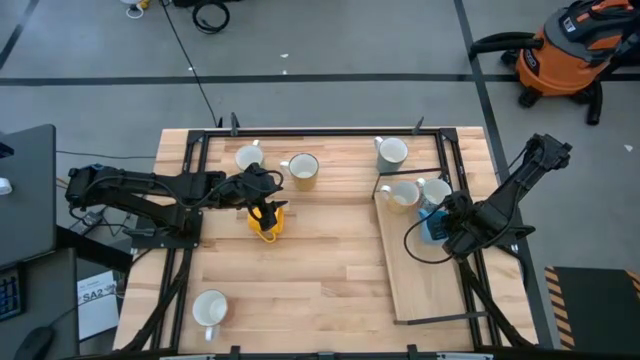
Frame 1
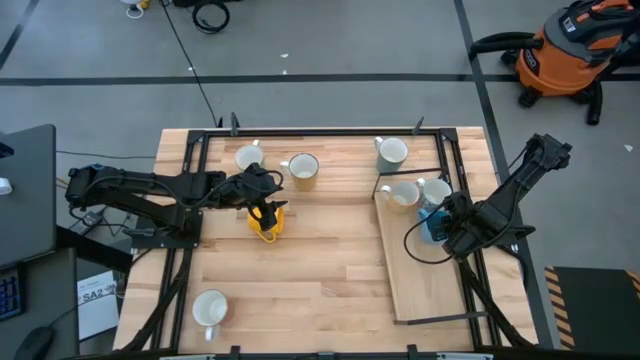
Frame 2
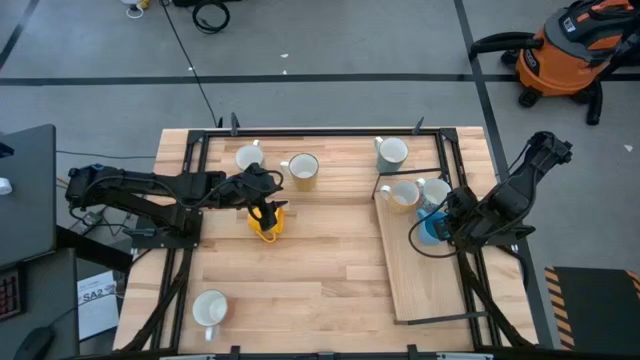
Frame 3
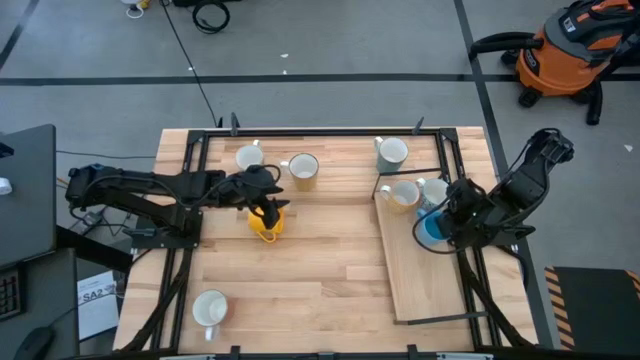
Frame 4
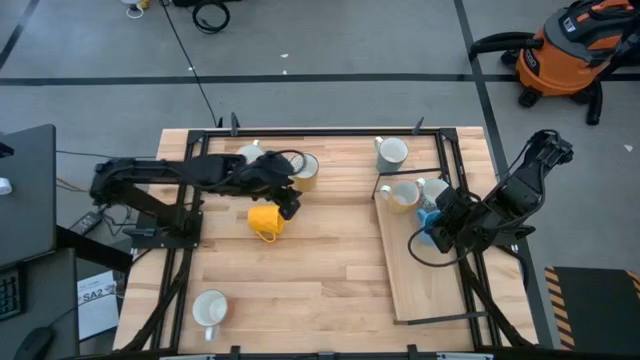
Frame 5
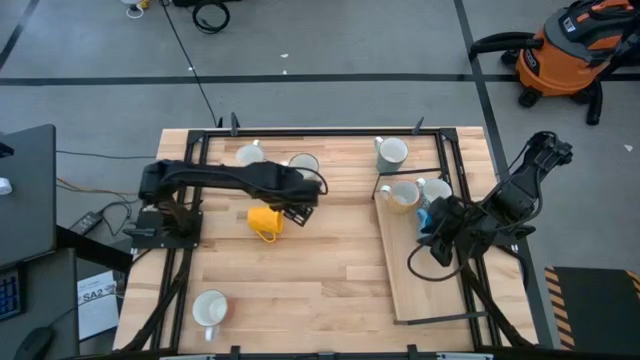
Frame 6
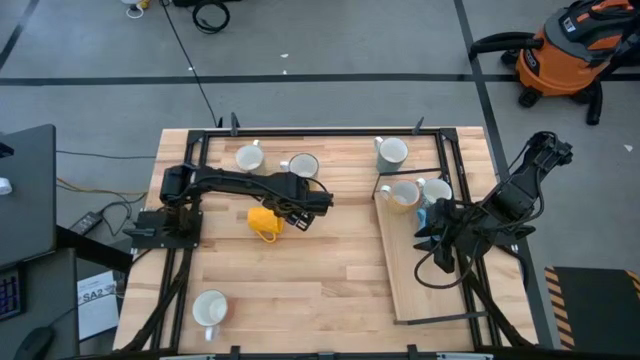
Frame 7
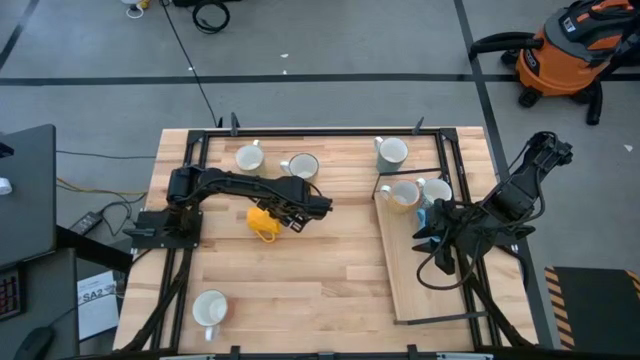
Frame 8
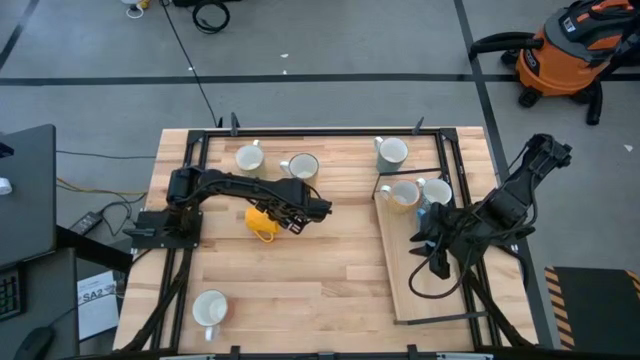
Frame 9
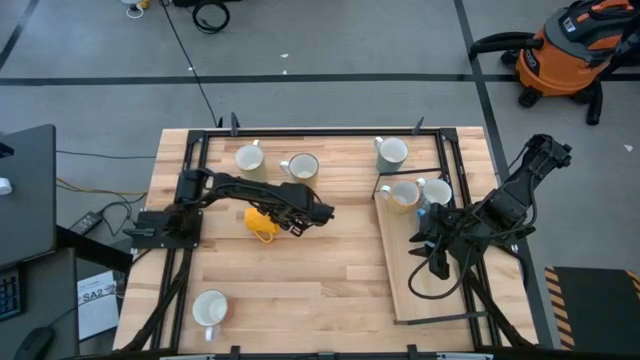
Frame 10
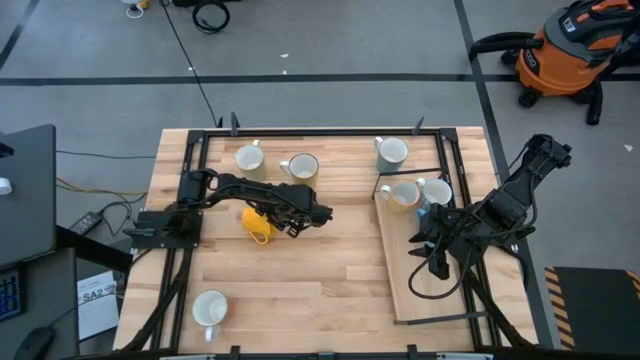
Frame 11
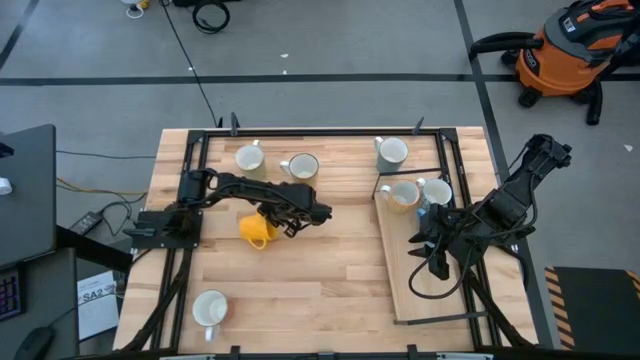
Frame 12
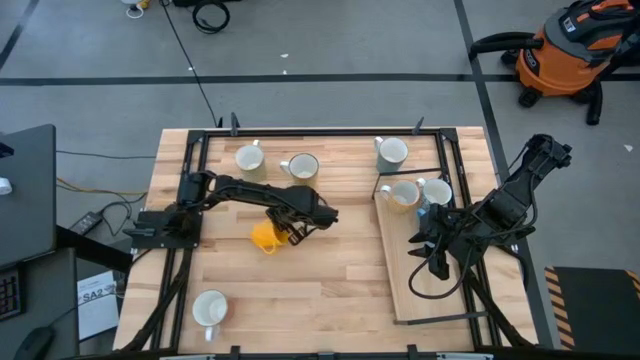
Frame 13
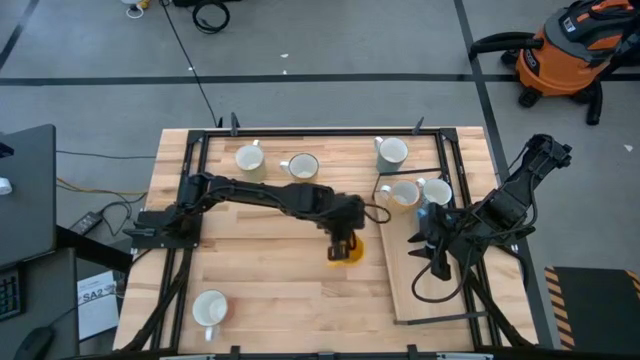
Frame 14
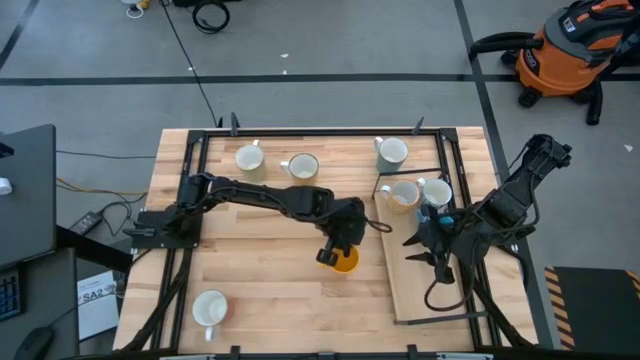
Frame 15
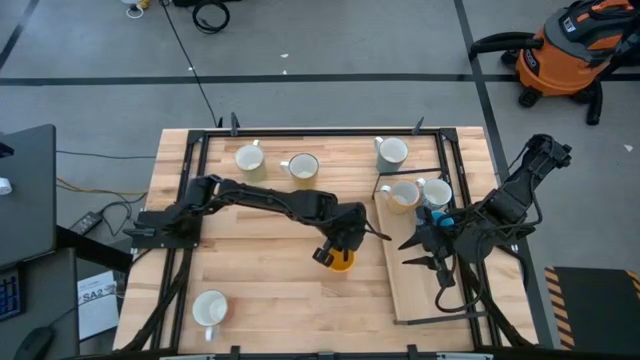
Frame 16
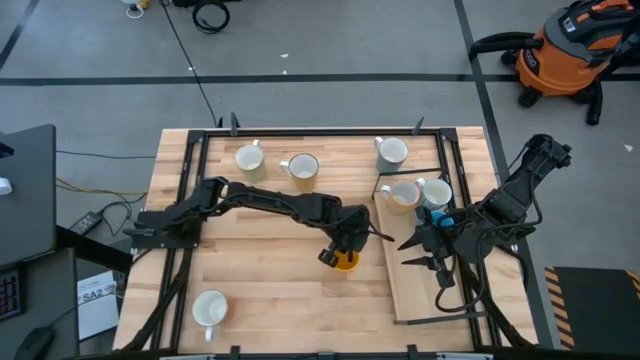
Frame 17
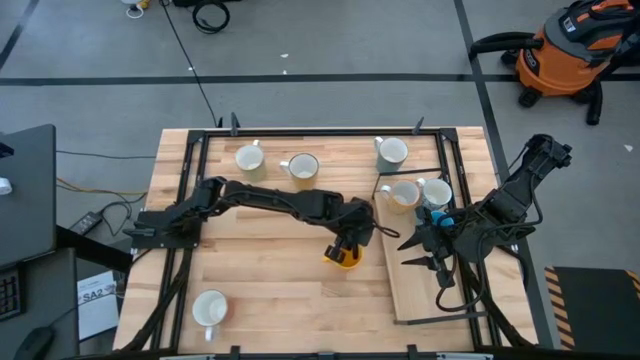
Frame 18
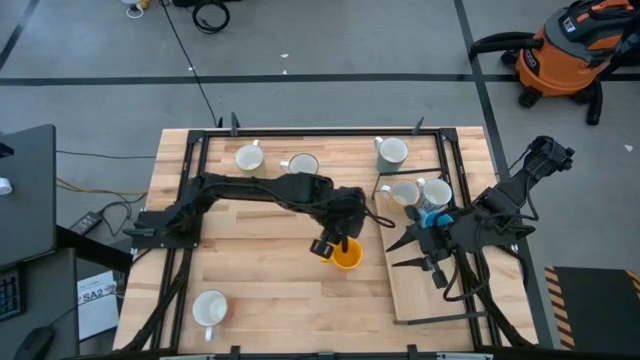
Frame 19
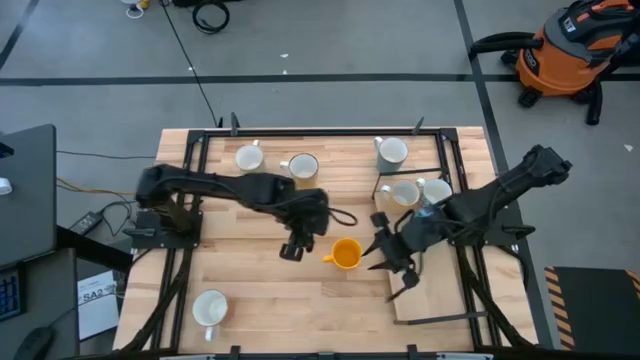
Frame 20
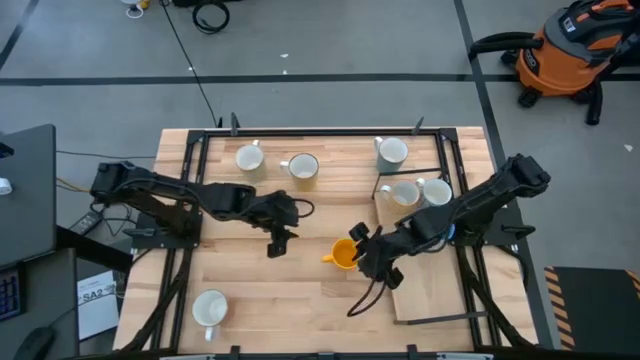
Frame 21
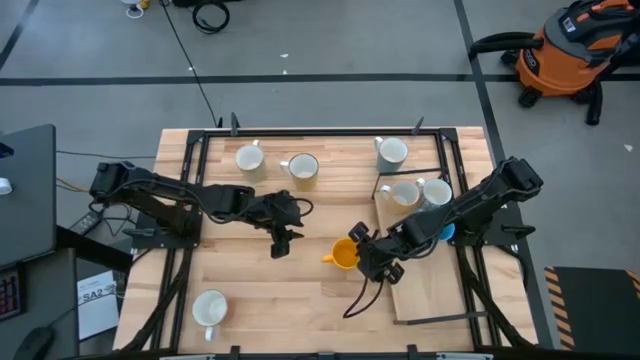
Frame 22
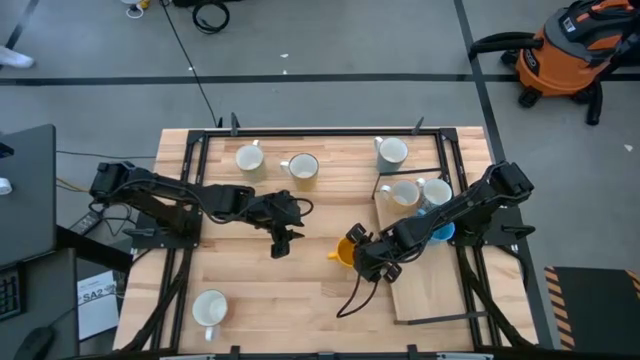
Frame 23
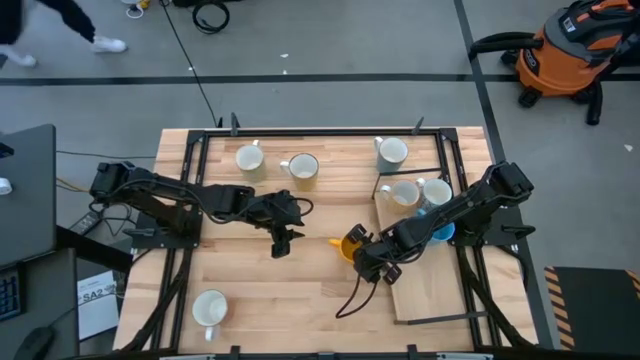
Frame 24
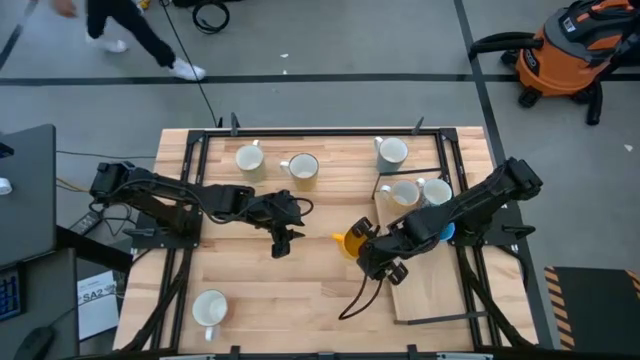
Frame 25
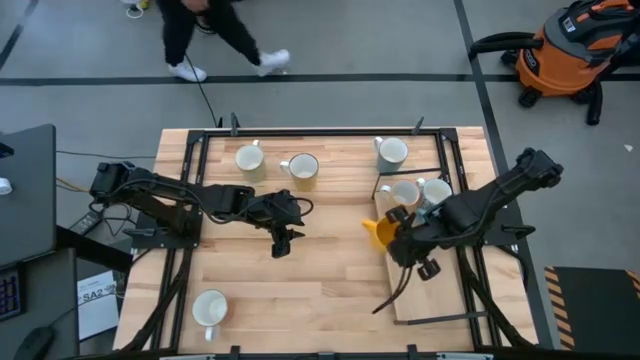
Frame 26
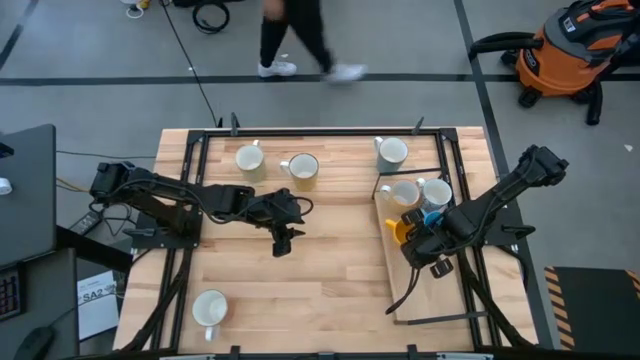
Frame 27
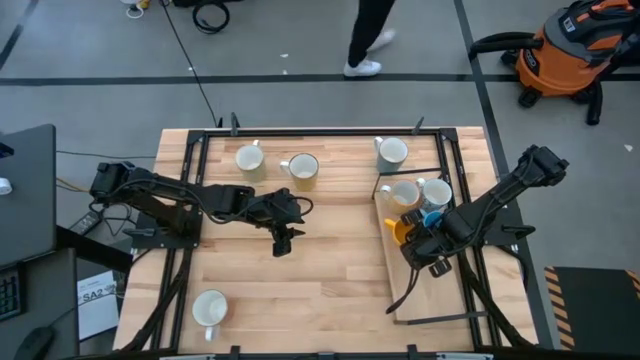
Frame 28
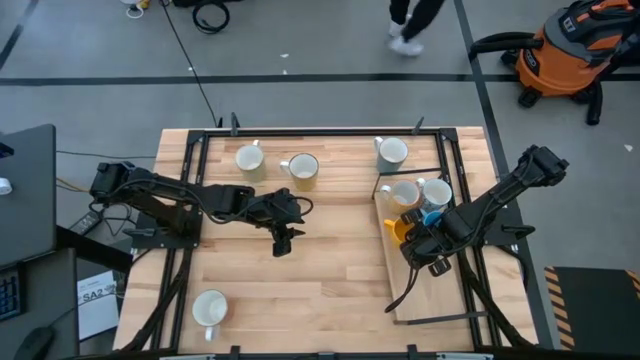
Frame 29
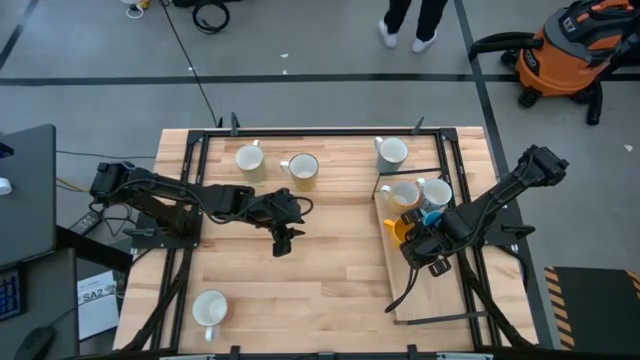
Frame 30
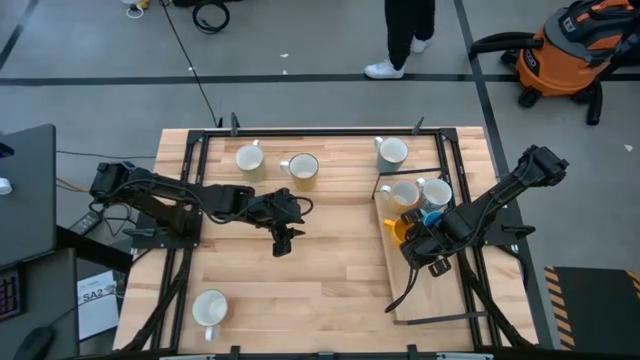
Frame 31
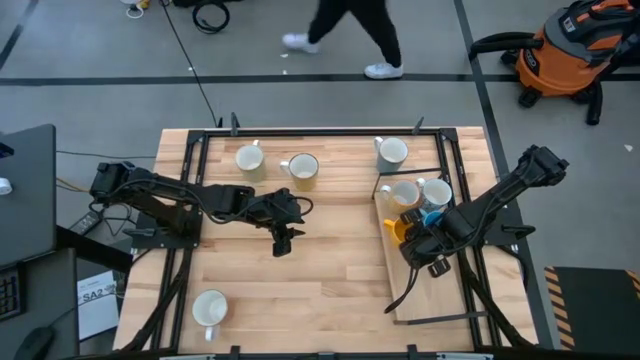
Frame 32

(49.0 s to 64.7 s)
Task: Place coffee mugs
Put the yellow mug on the shelf
